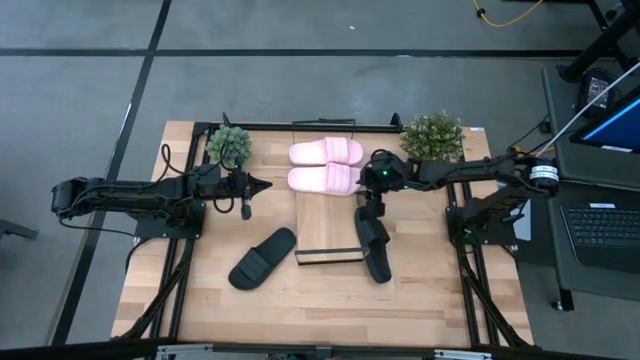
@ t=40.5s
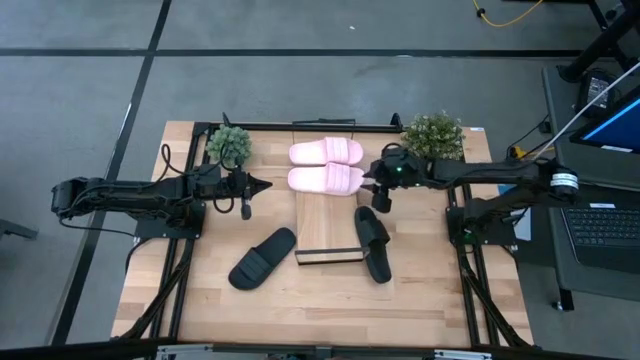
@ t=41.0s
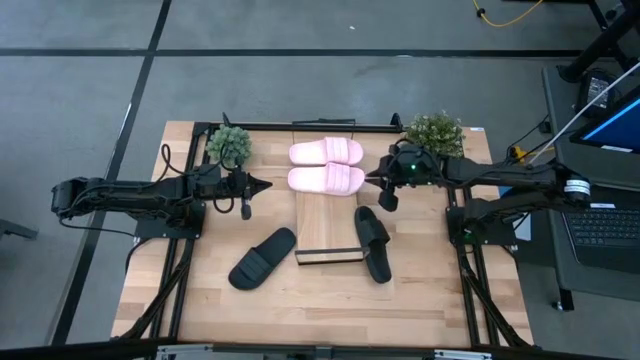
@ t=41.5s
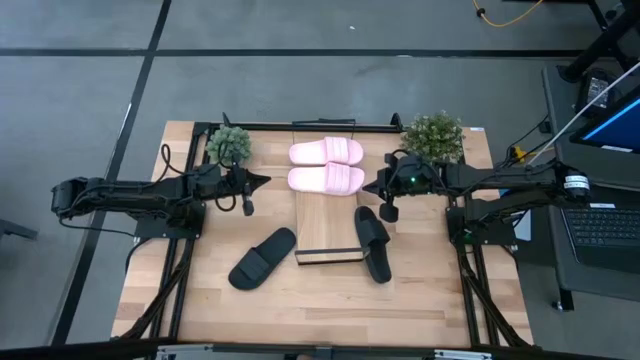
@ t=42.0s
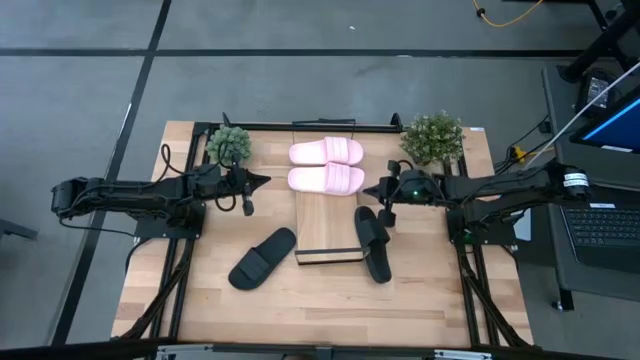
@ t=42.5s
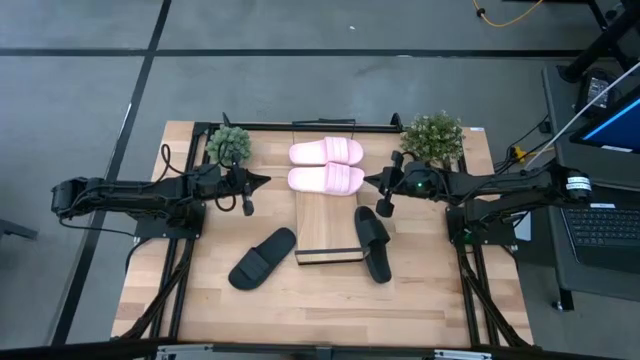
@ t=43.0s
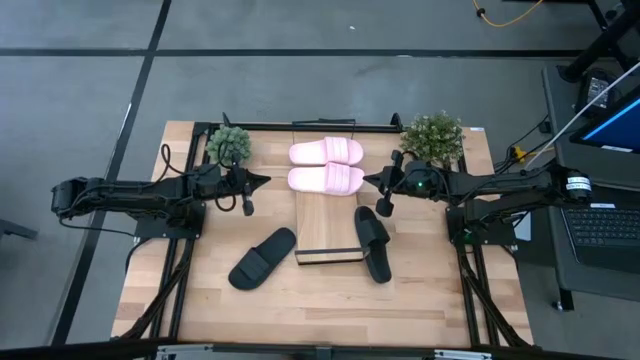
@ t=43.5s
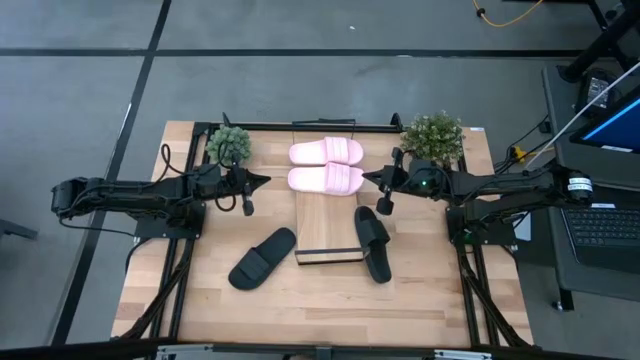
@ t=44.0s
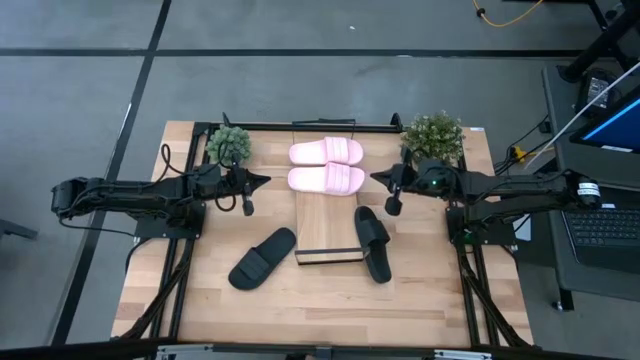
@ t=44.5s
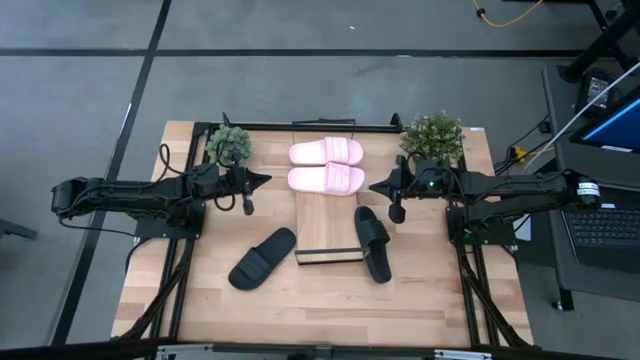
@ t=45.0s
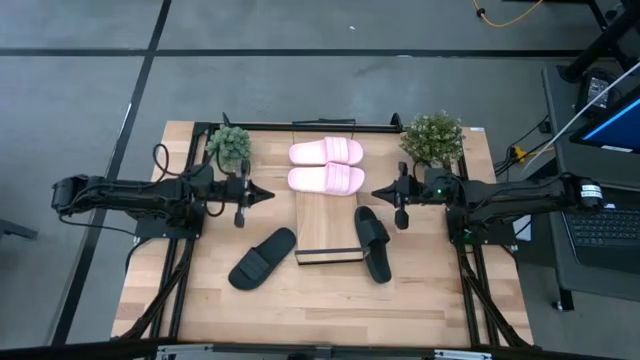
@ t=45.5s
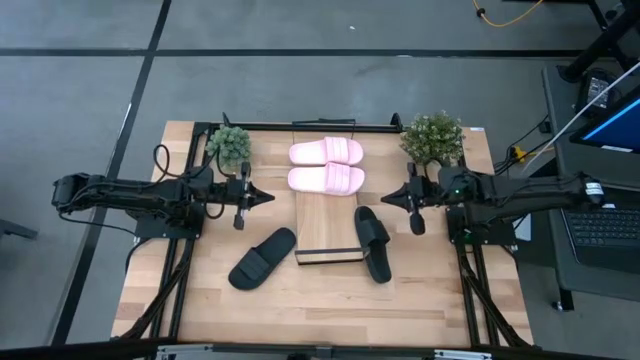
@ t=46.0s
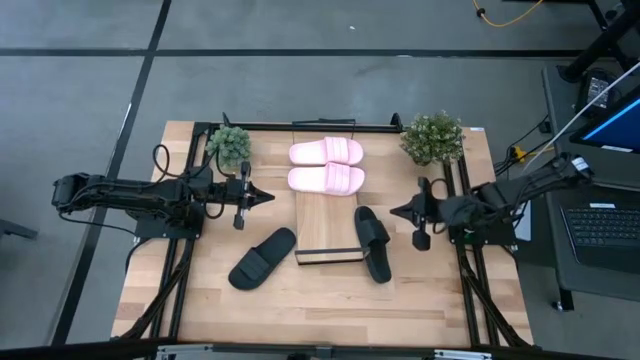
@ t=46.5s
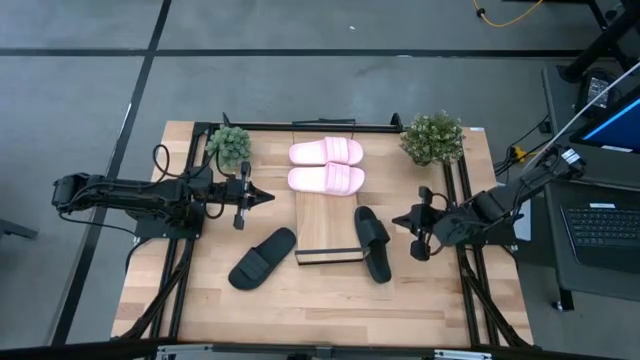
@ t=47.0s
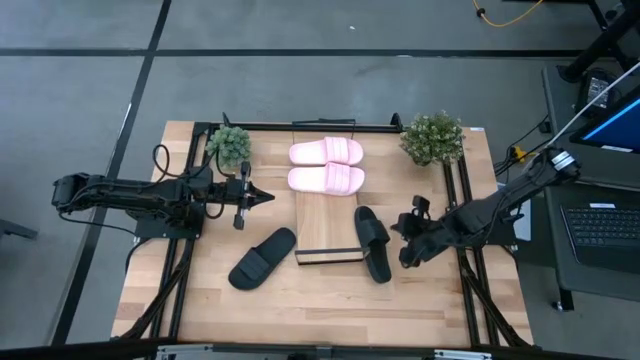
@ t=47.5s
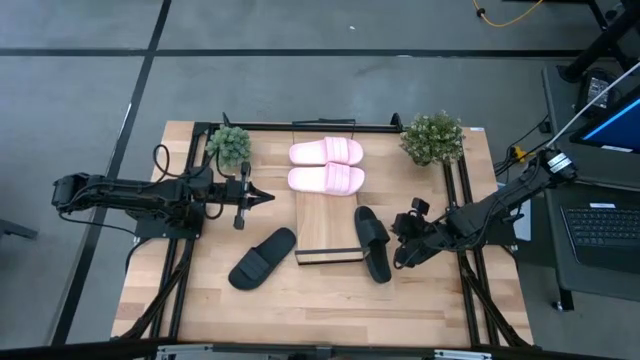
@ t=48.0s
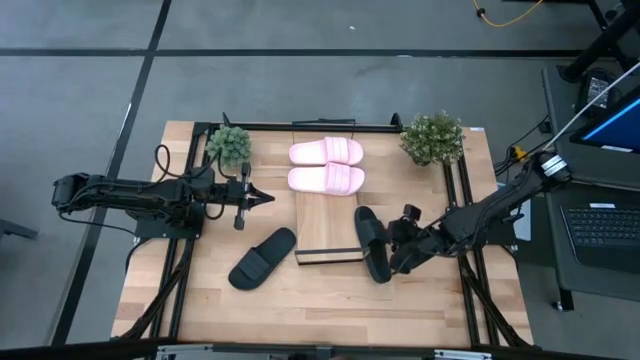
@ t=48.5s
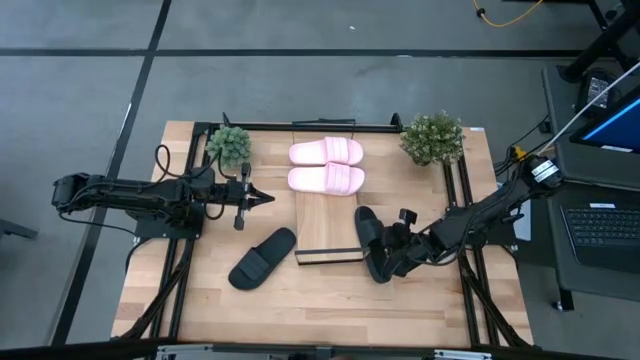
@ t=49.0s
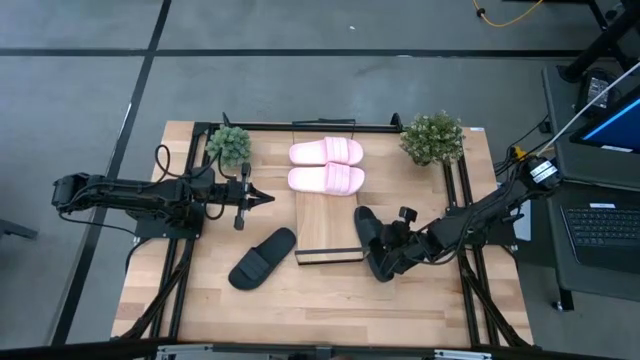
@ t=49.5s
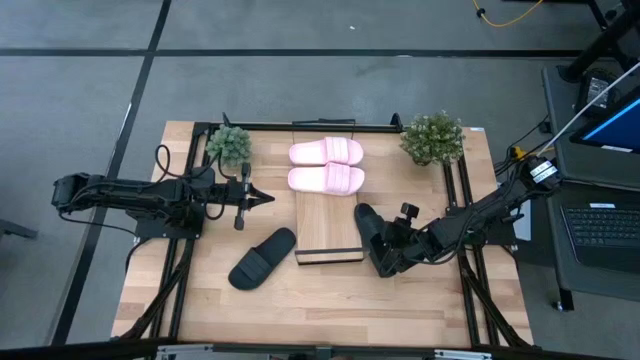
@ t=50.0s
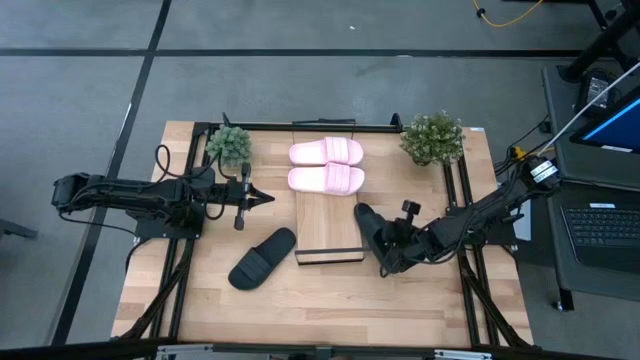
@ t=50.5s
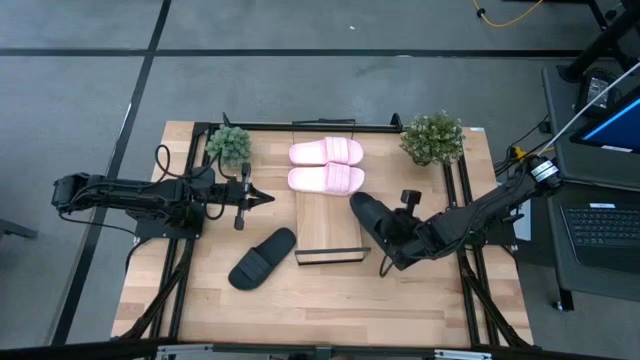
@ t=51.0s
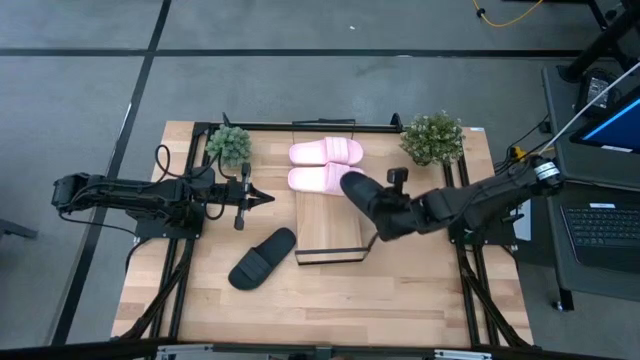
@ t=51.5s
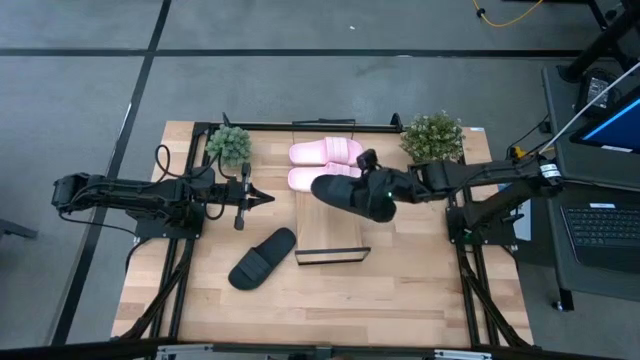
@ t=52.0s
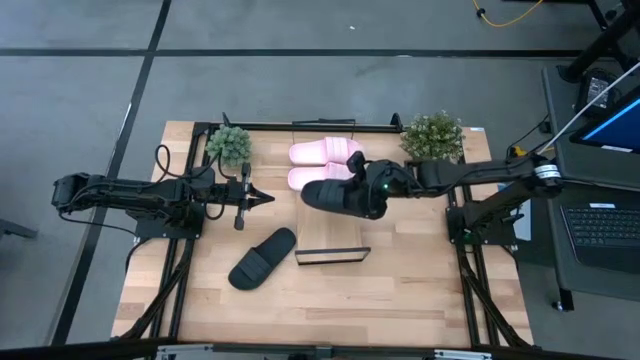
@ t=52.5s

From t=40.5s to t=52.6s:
Task: Pick and place slides into the shelf
Put the right black slides on the shelf

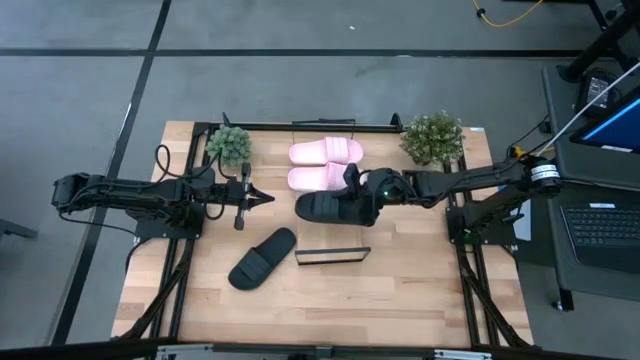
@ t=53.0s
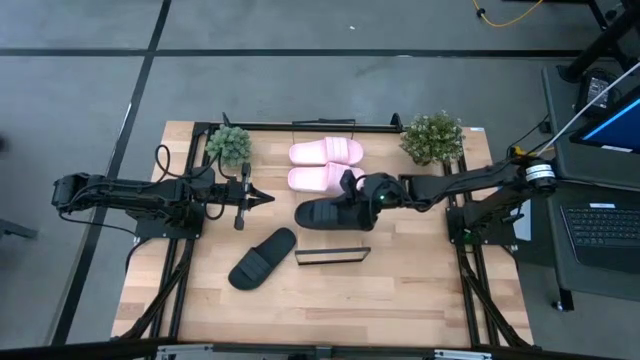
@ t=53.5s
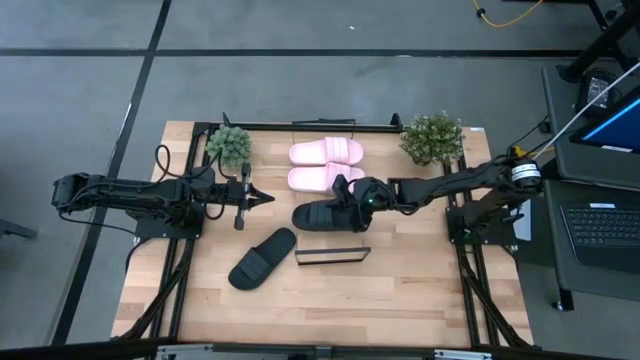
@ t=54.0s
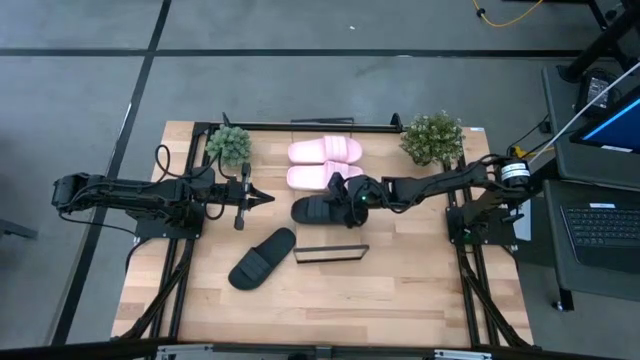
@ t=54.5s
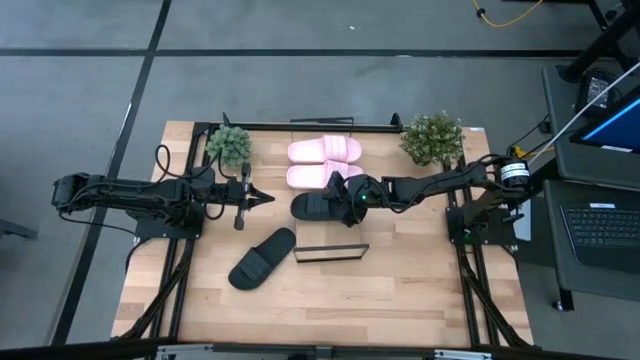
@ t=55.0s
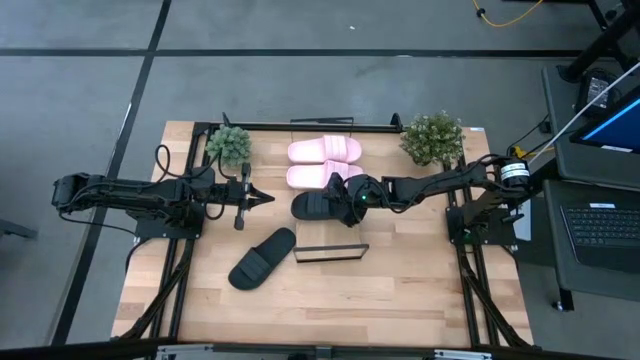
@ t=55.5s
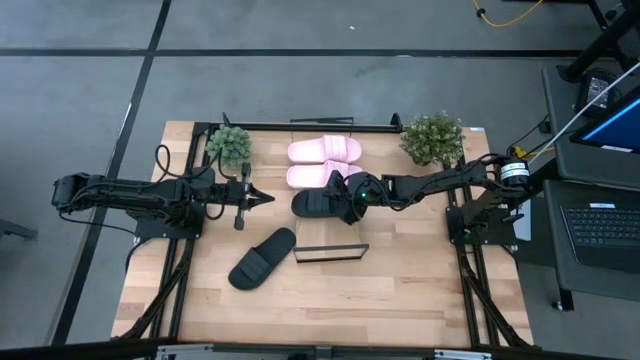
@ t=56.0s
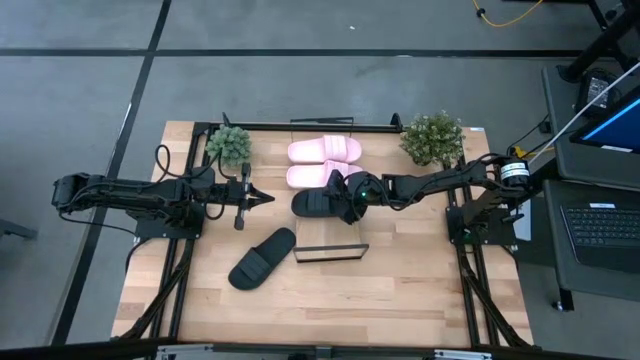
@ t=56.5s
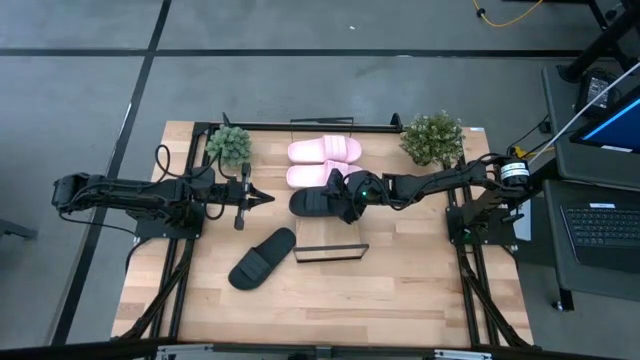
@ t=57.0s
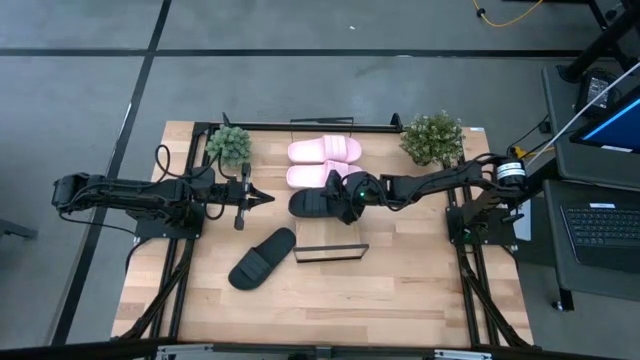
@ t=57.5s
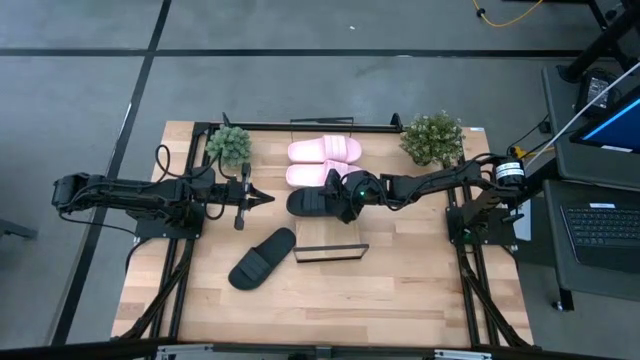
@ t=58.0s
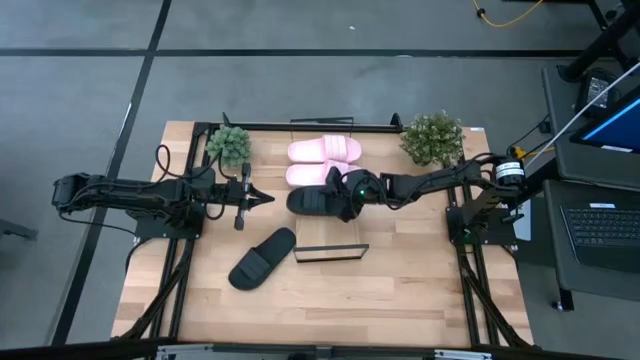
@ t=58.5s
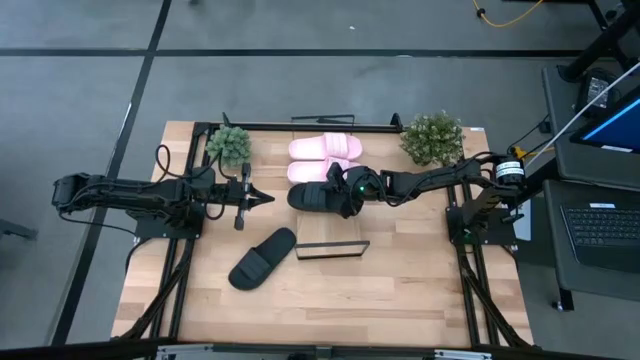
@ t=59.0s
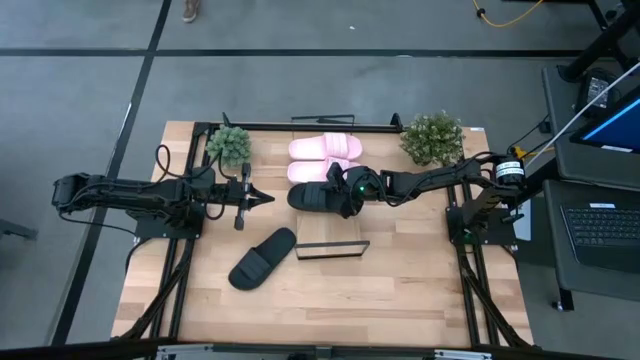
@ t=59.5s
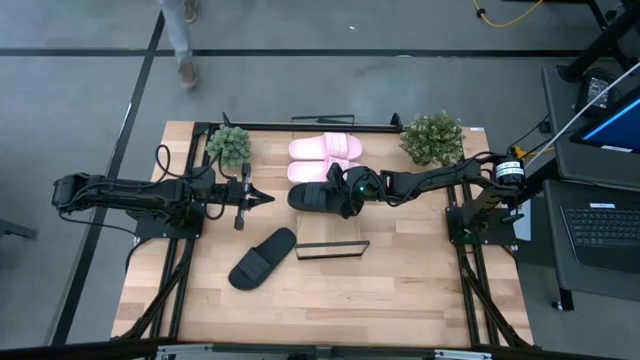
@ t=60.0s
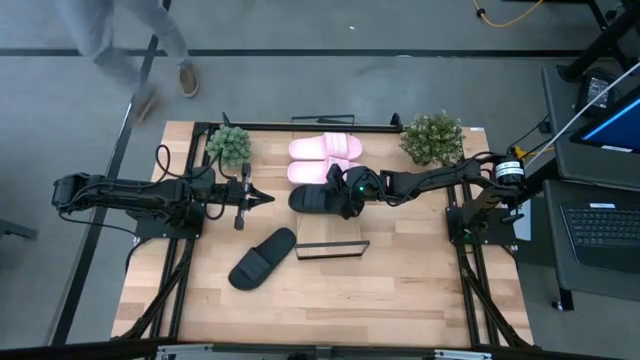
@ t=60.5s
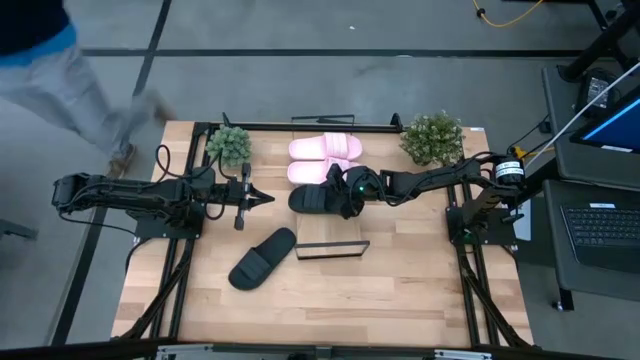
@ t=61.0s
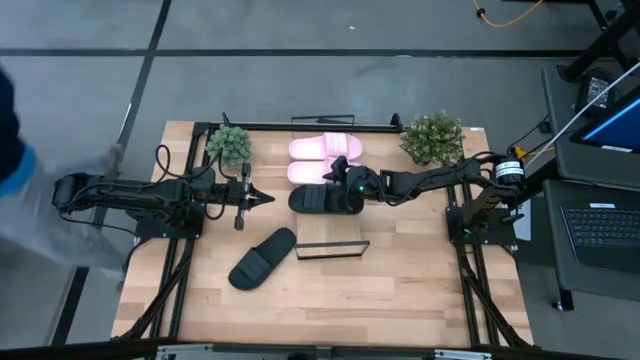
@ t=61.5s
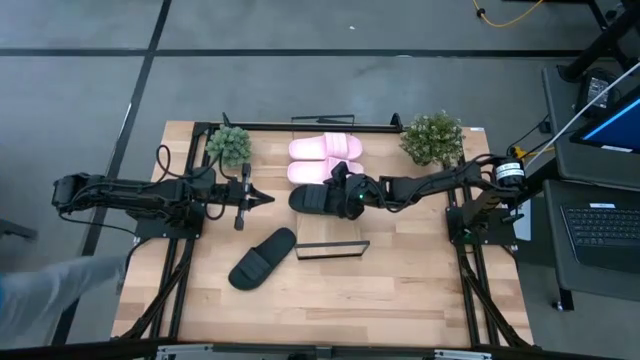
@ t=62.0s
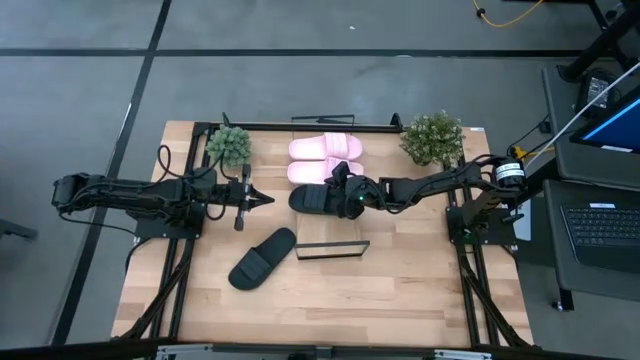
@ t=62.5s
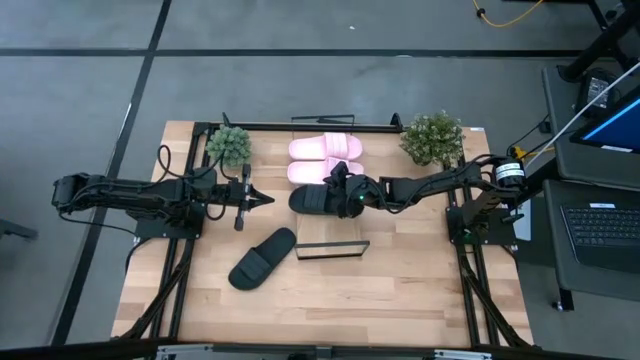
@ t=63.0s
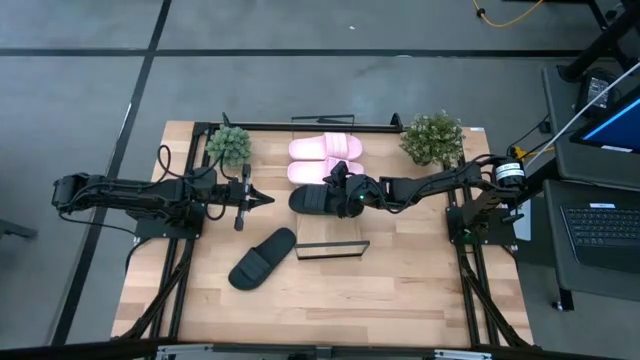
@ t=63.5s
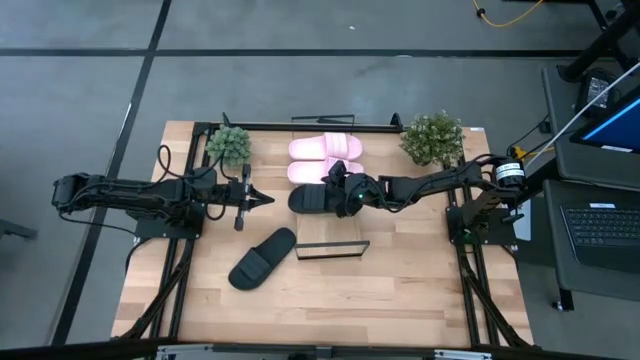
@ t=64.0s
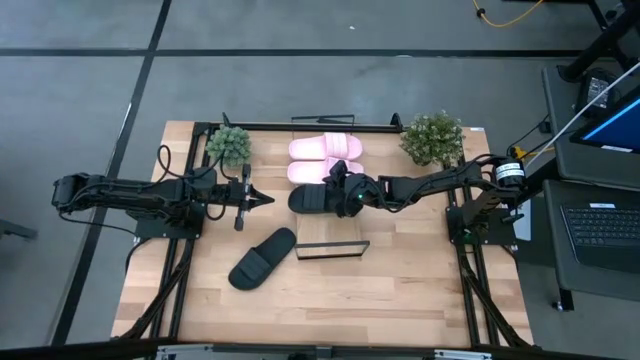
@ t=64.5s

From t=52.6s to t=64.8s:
Put the right black slides on the shelf
